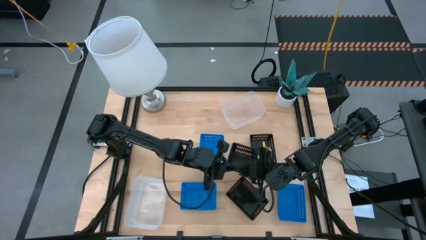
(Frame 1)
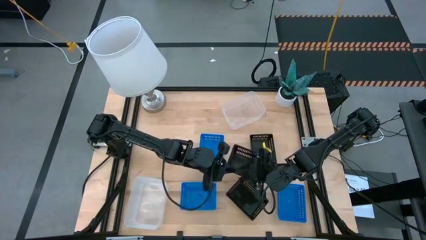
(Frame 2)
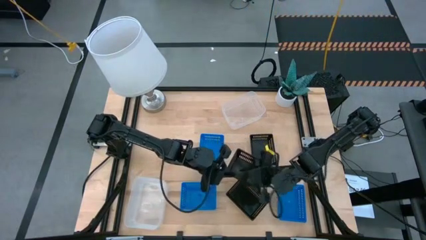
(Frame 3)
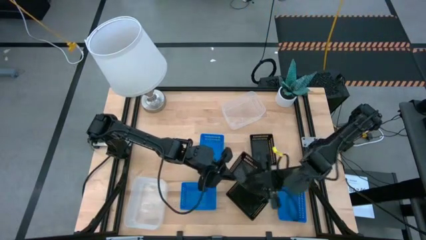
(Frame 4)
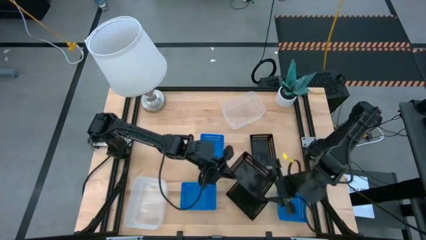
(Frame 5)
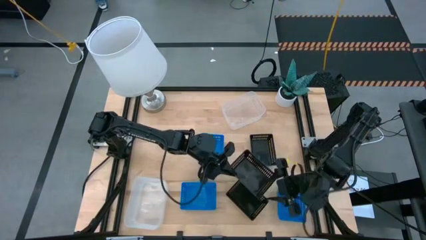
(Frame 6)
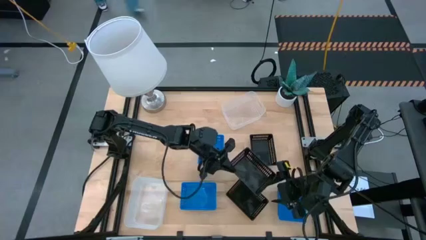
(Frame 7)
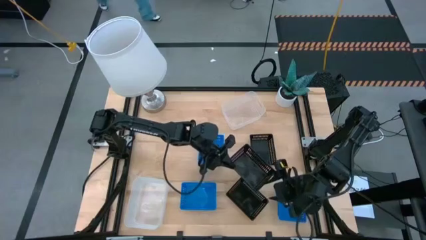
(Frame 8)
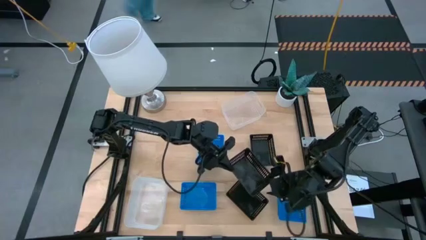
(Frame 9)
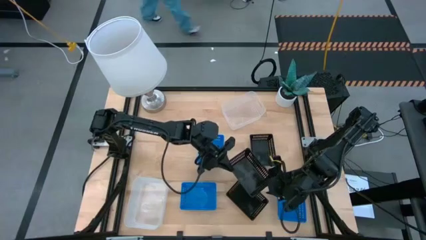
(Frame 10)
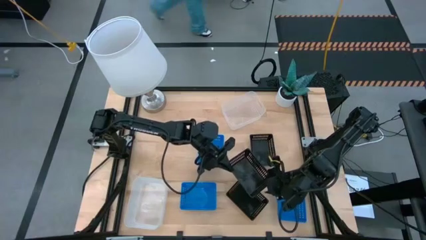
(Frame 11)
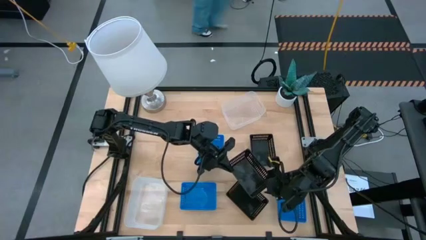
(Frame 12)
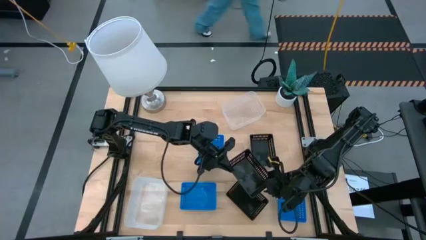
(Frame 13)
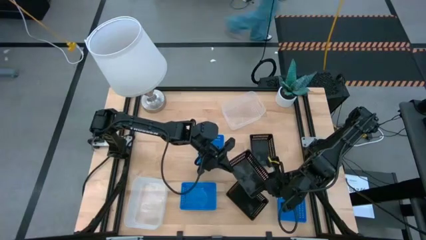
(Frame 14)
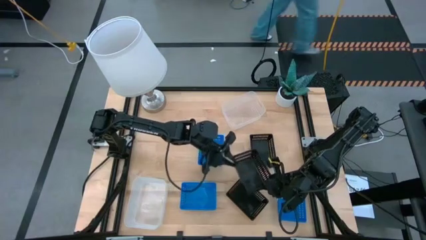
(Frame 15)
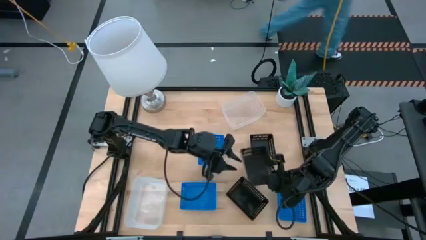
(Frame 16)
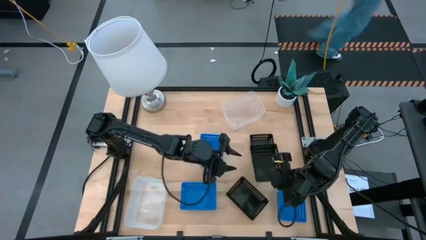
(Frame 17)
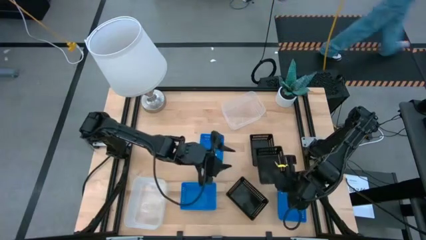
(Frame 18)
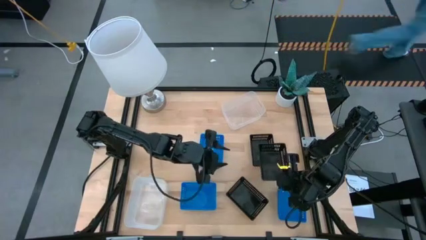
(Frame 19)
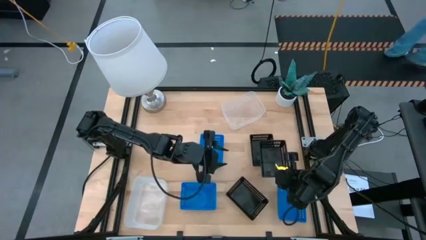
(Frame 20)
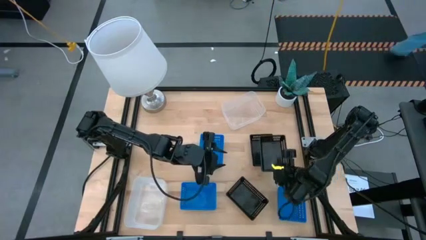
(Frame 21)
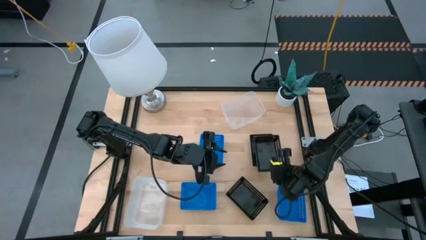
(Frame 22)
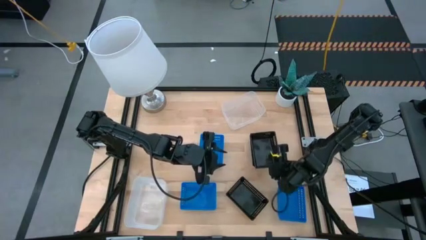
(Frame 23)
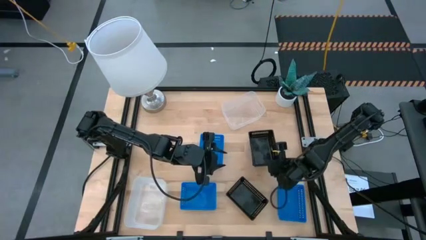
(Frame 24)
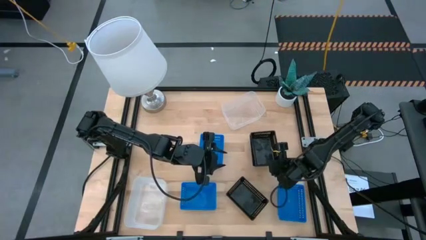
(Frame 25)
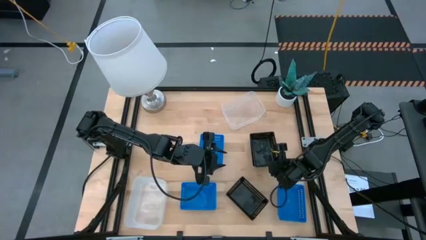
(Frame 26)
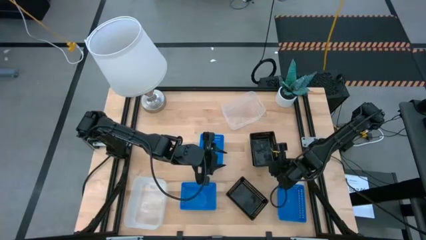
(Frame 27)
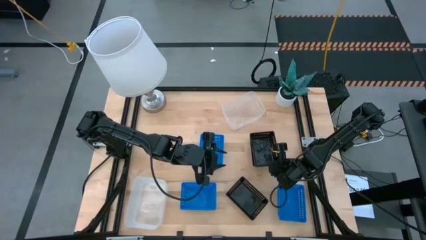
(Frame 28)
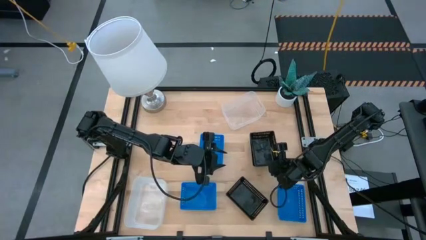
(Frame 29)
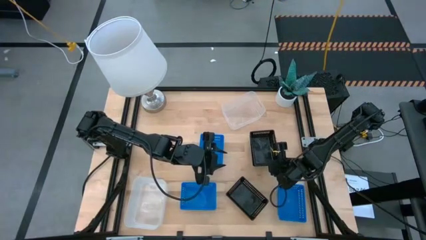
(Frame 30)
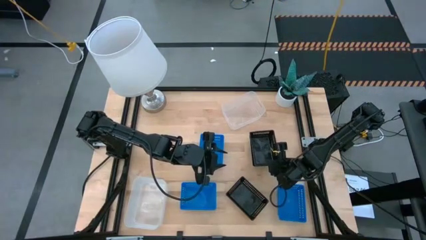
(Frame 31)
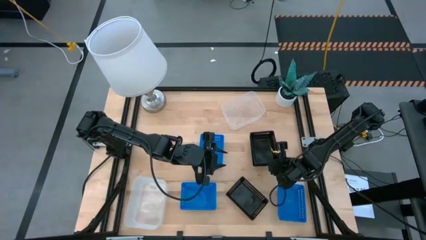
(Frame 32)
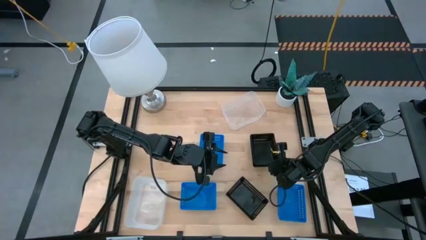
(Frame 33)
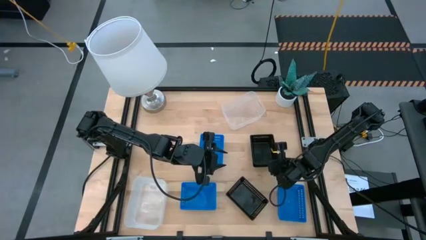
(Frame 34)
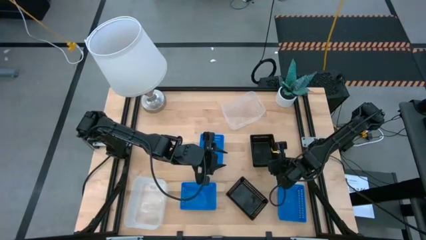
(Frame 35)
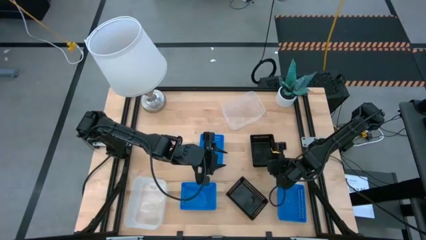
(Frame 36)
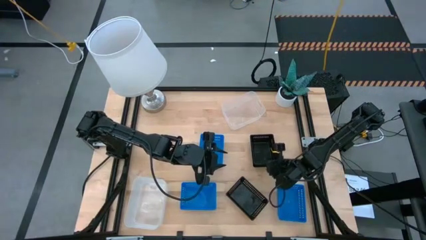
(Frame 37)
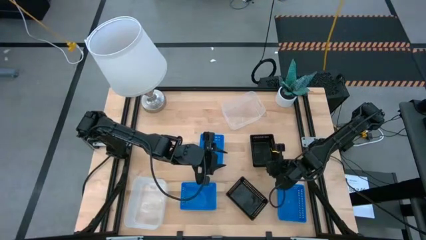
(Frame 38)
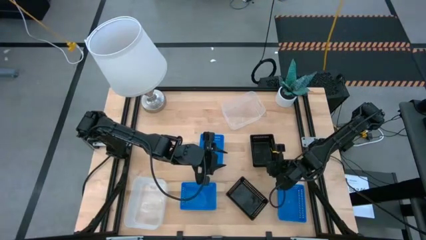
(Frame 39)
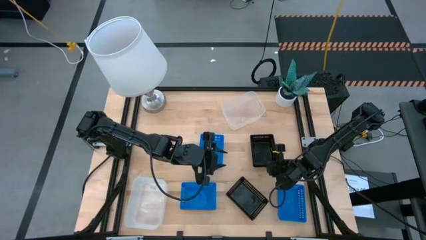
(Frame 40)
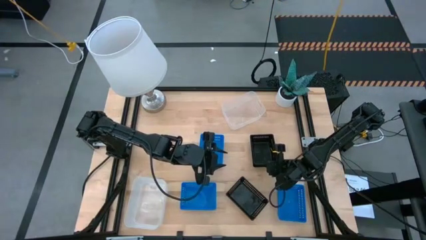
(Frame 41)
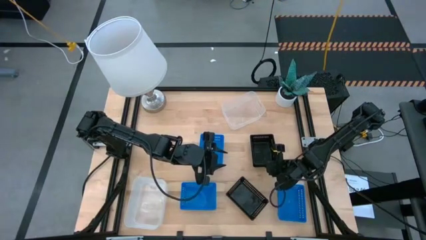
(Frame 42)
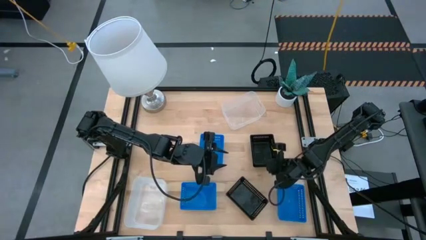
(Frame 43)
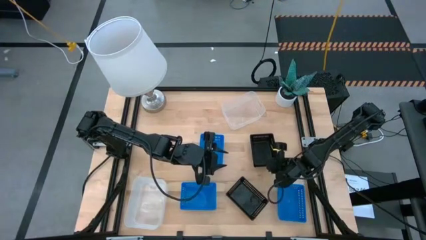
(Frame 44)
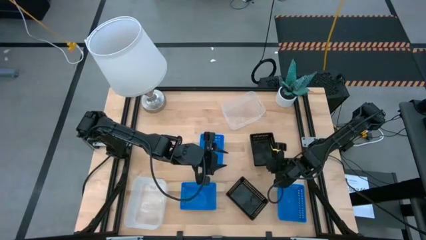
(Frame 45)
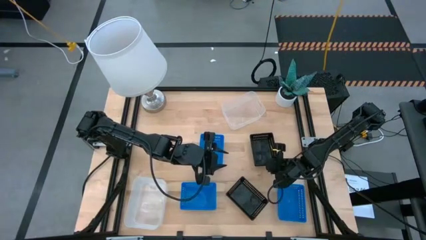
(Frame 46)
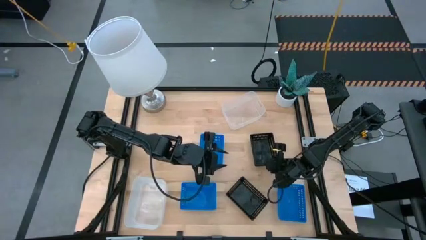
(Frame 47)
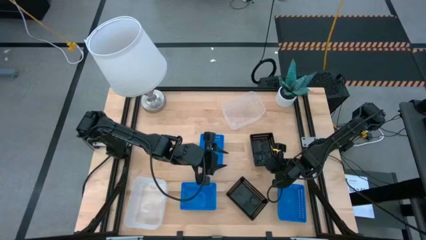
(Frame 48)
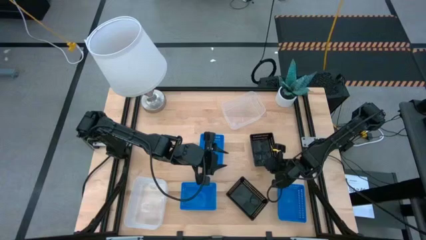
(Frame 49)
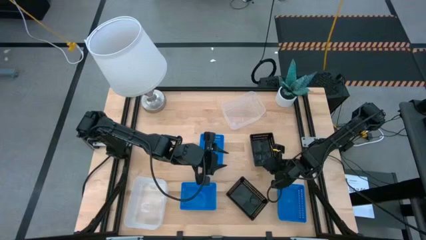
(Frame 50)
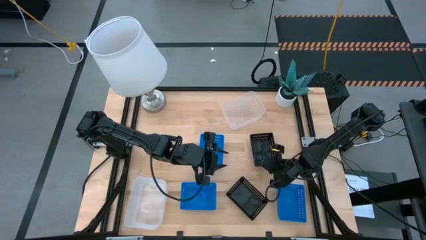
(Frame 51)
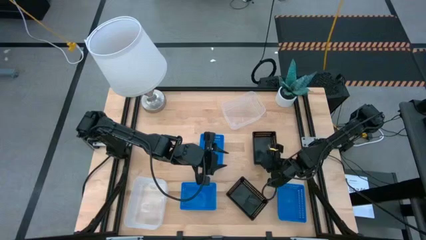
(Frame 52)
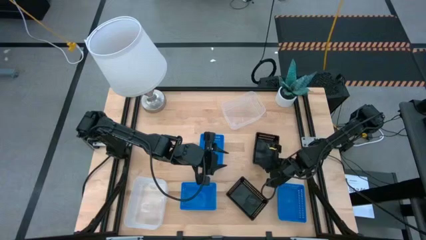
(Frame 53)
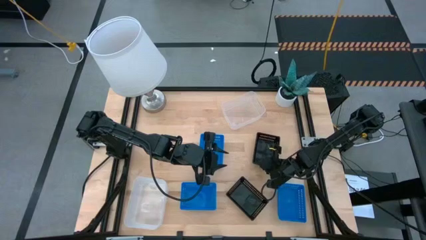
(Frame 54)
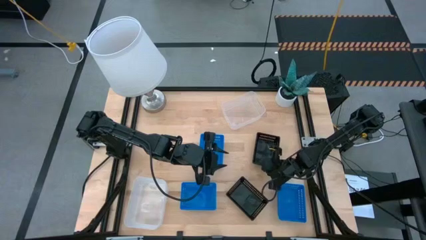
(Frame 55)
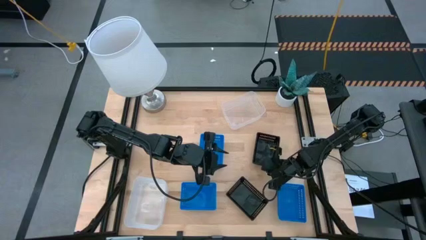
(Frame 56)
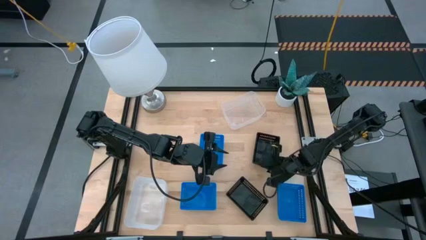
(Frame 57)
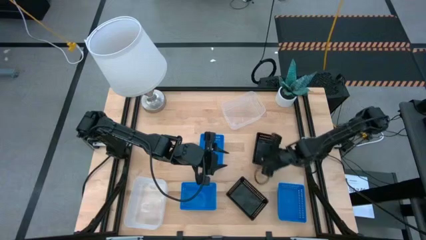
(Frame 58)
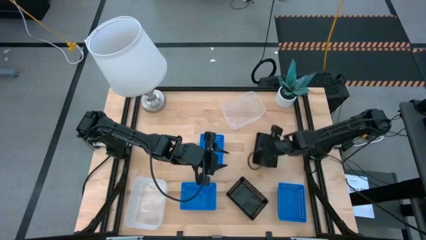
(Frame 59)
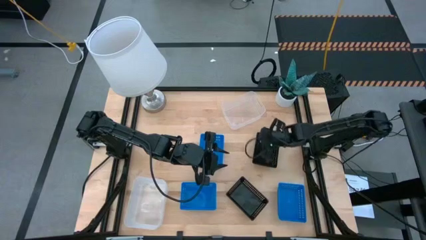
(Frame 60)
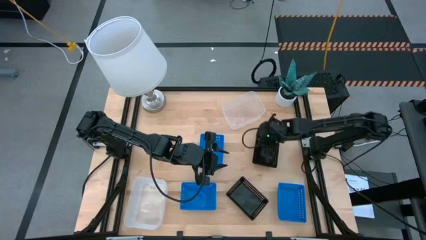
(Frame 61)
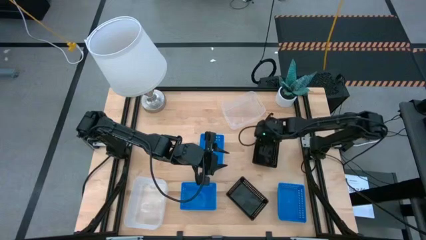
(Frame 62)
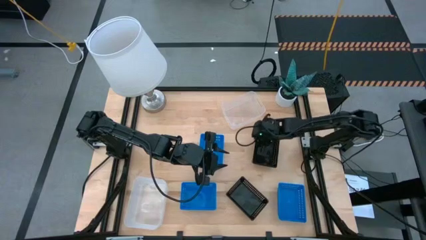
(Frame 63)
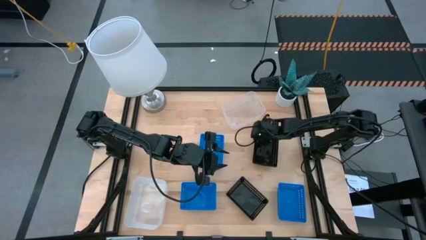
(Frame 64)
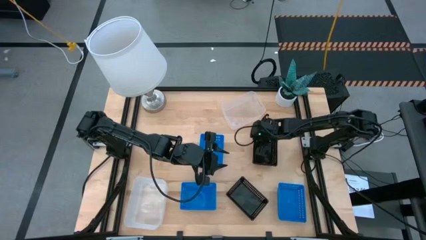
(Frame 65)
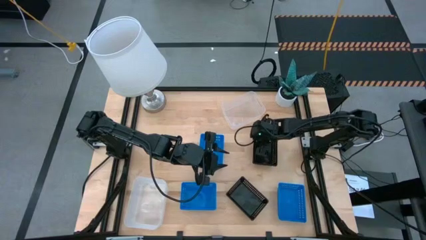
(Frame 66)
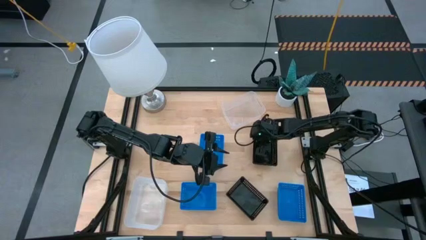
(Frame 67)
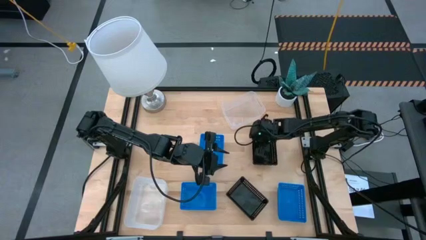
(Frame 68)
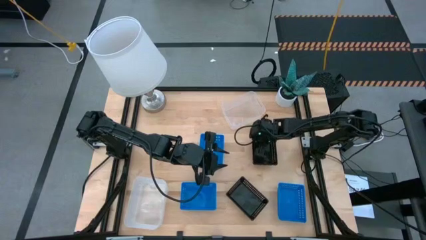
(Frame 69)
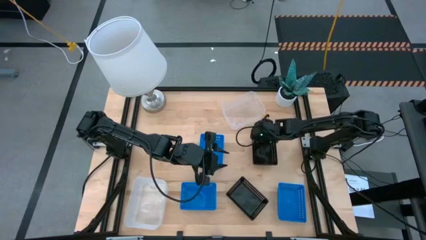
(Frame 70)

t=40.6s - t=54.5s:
Stack the top left black bin on the top right black bin
